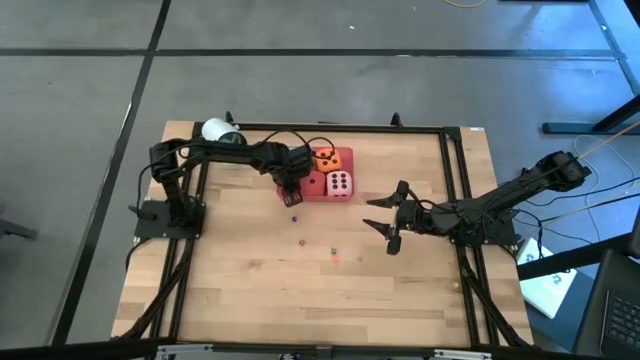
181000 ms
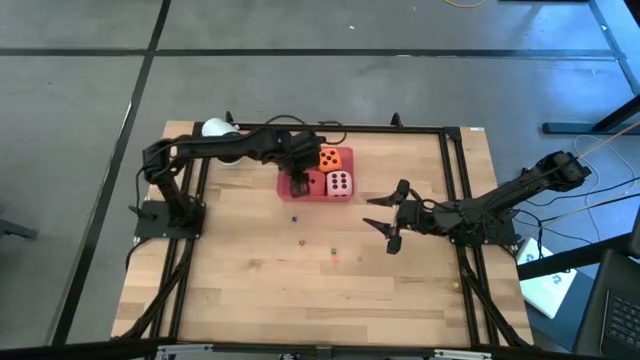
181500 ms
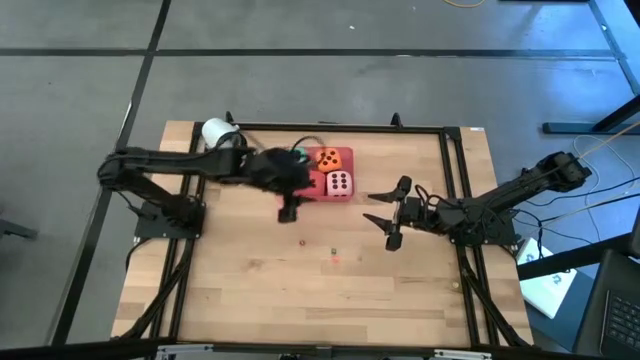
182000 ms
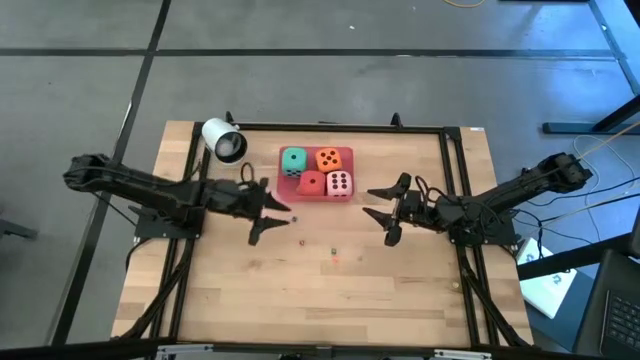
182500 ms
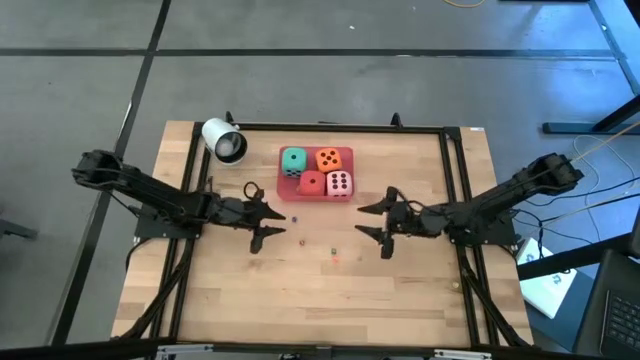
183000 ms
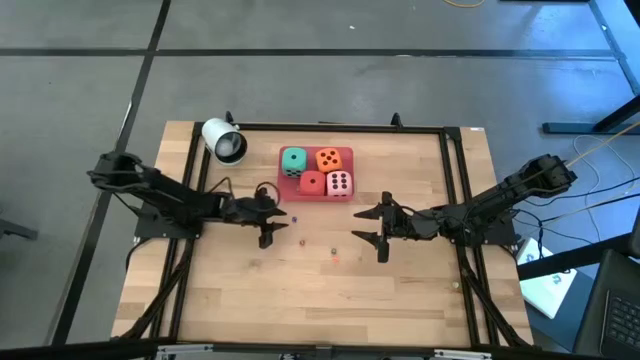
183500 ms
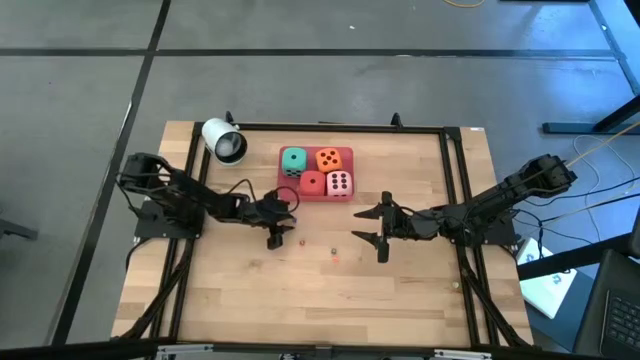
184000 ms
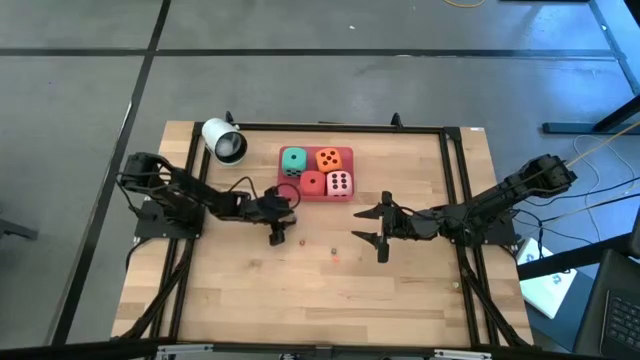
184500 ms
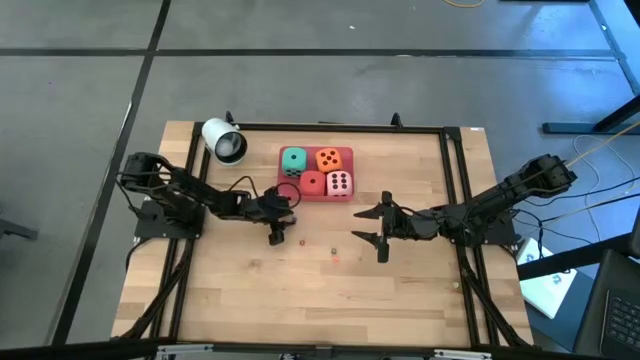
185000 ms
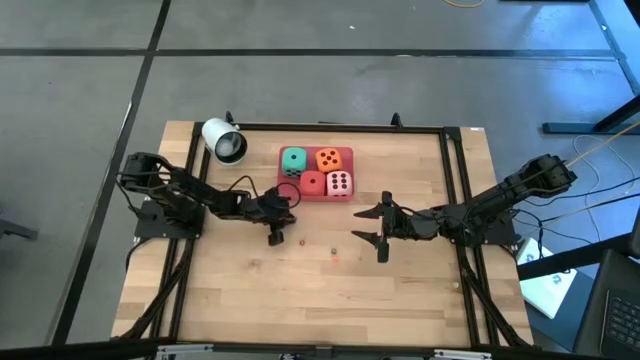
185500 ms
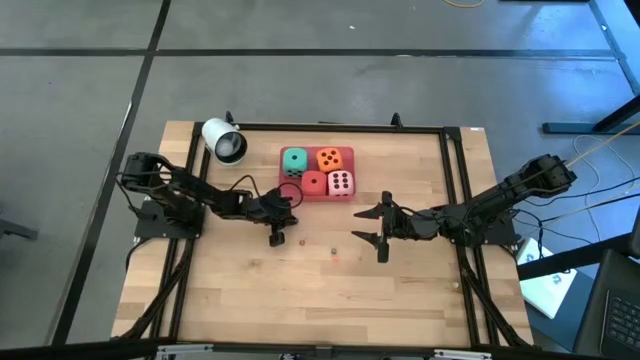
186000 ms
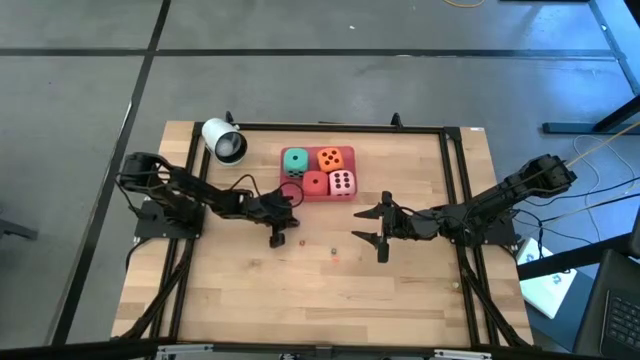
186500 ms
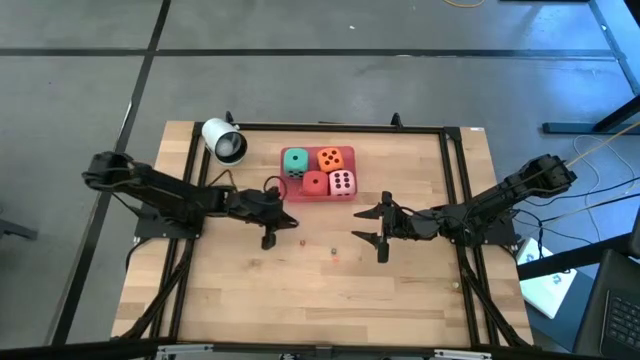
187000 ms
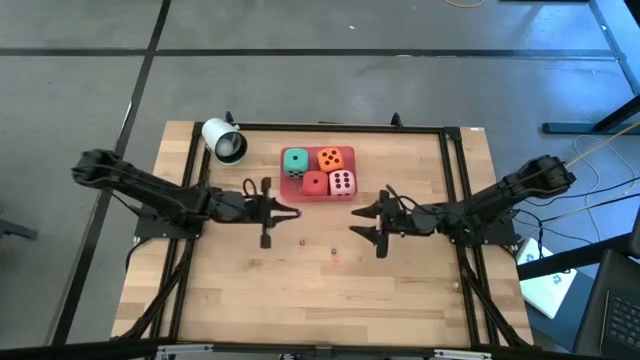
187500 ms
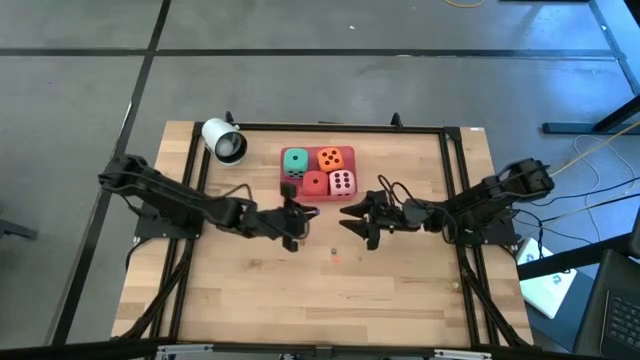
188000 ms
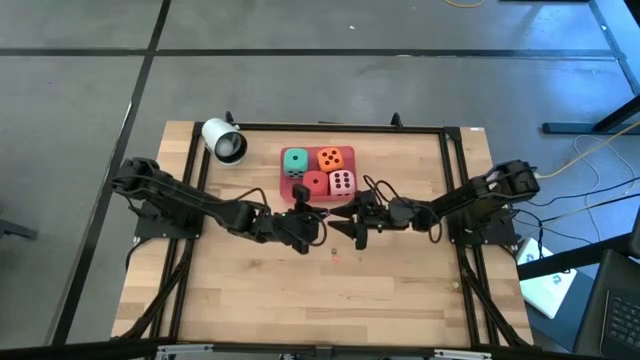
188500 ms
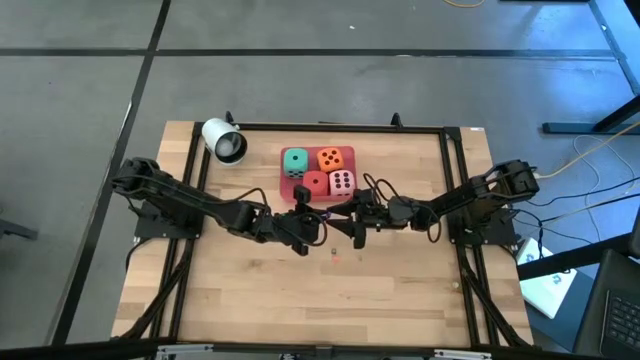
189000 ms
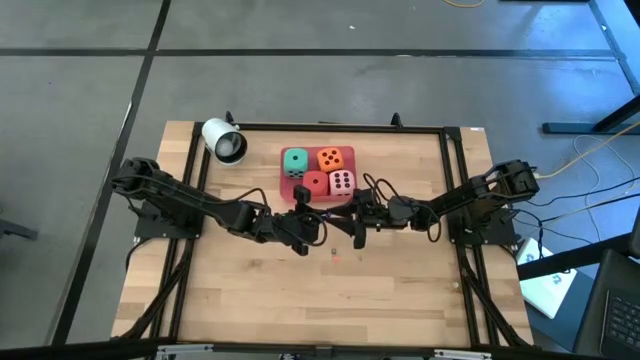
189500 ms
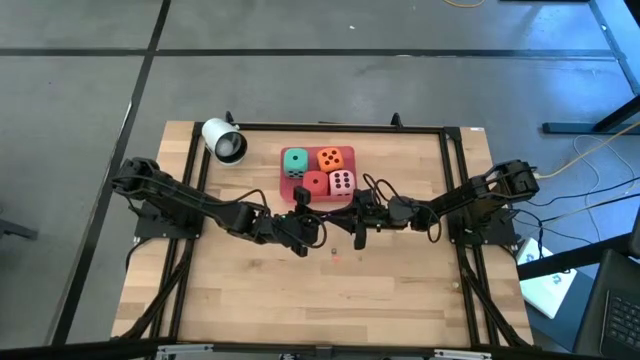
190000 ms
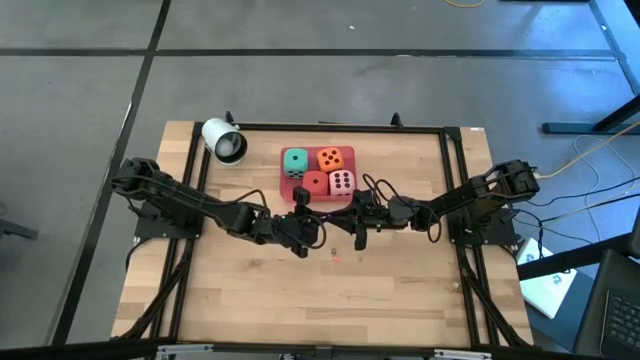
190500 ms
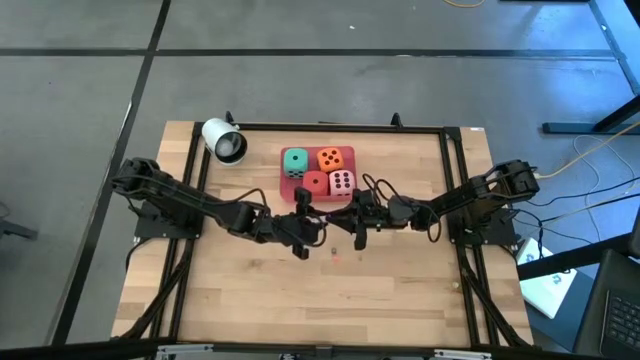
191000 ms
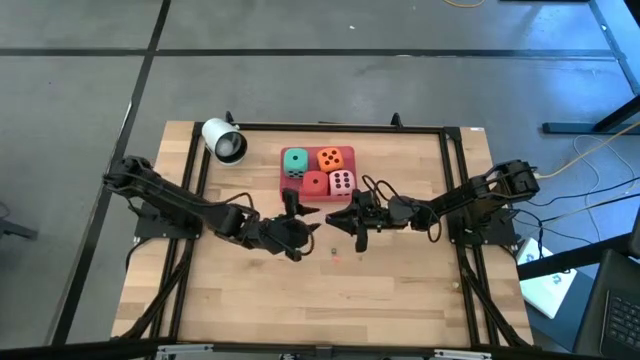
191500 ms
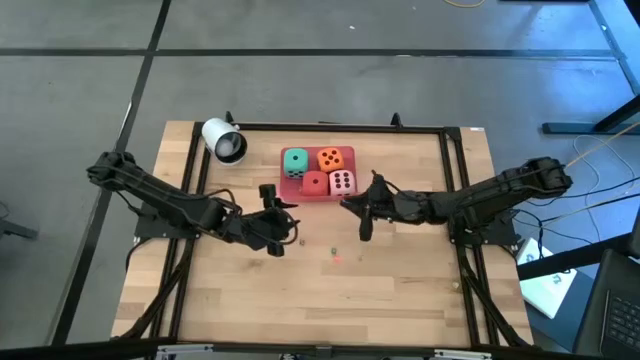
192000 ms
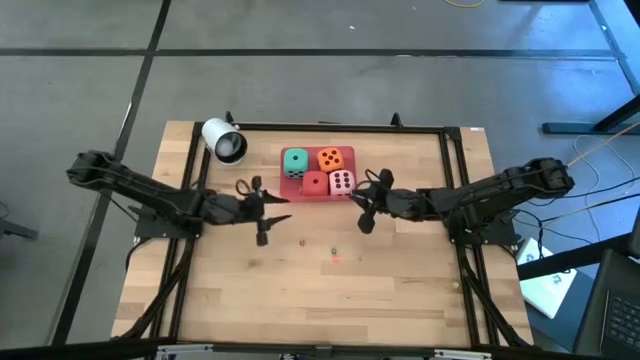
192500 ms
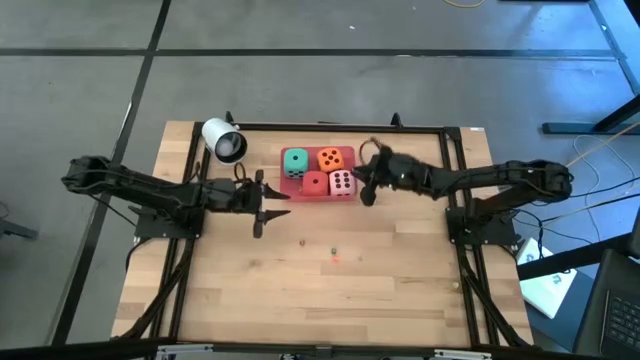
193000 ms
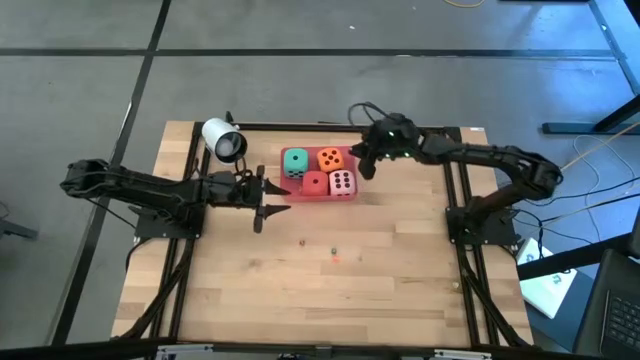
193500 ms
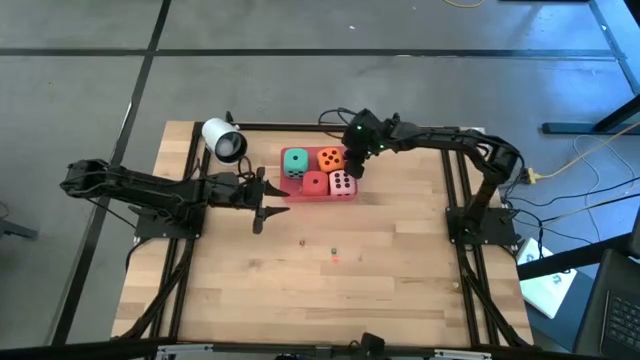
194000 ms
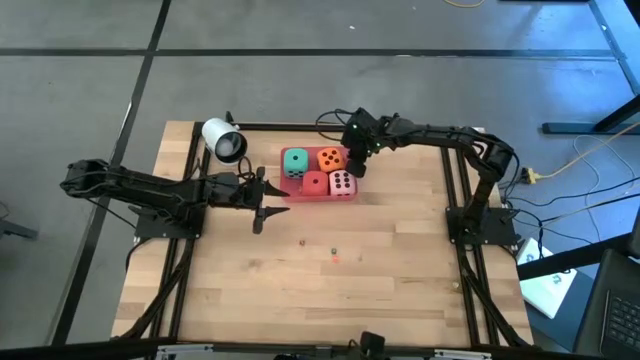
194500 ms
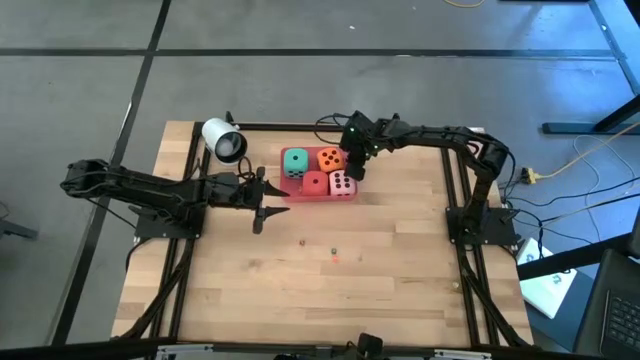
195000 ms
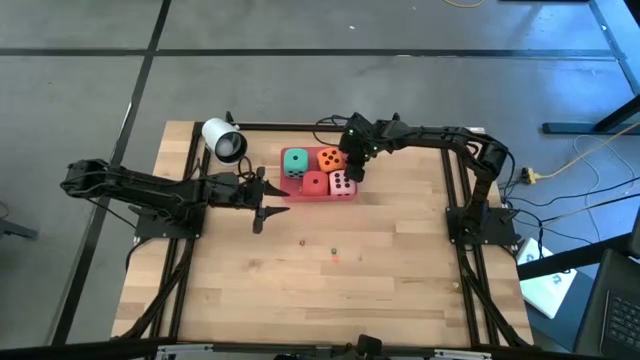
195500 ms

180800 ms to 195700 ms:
Task: Pick & Place Dice
Put the small blue dice into the pink bin

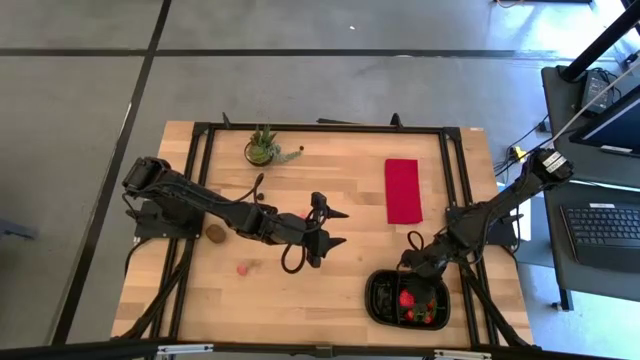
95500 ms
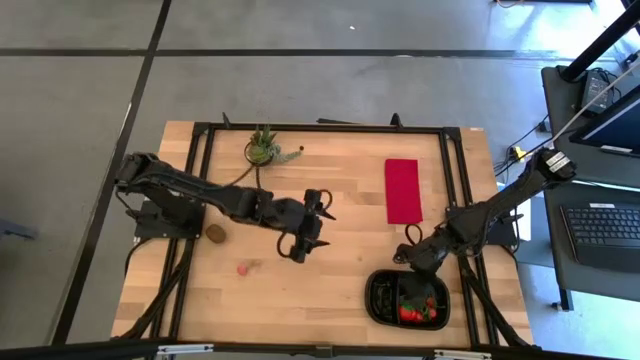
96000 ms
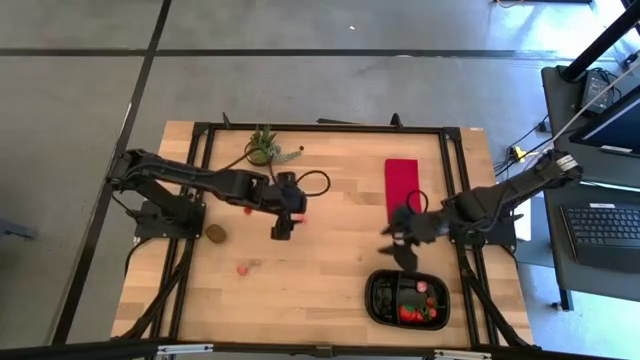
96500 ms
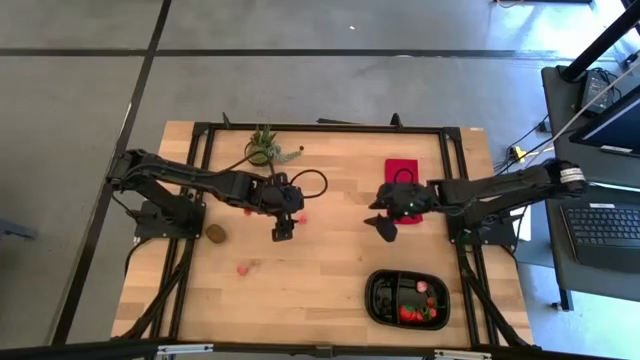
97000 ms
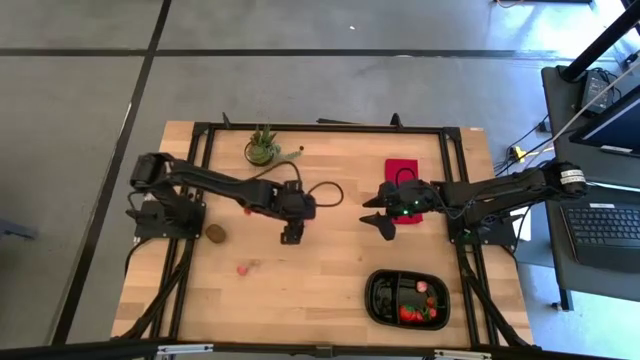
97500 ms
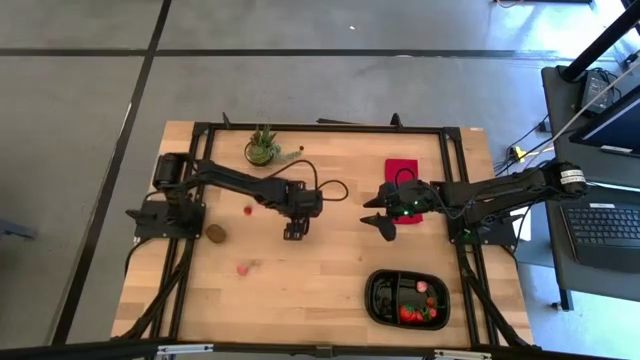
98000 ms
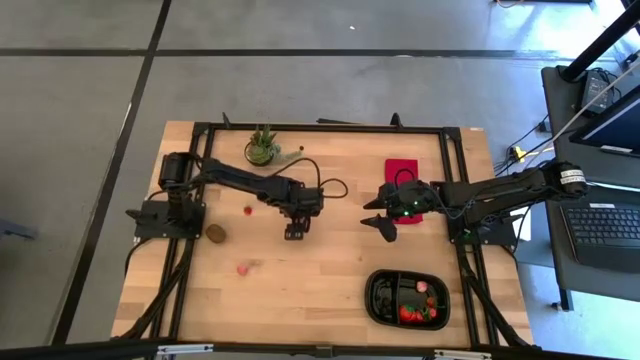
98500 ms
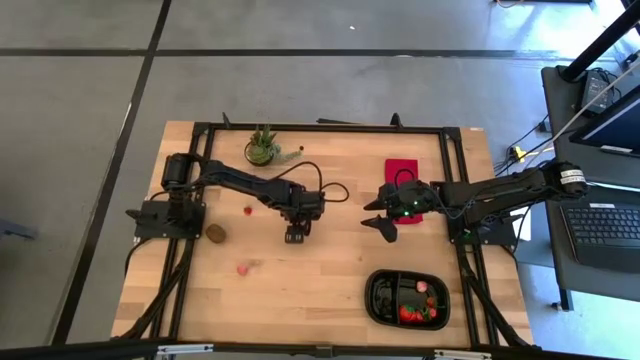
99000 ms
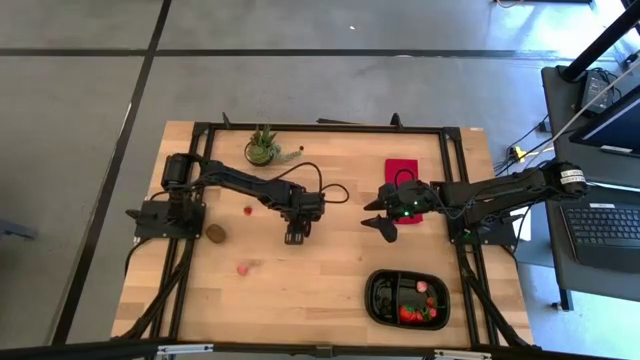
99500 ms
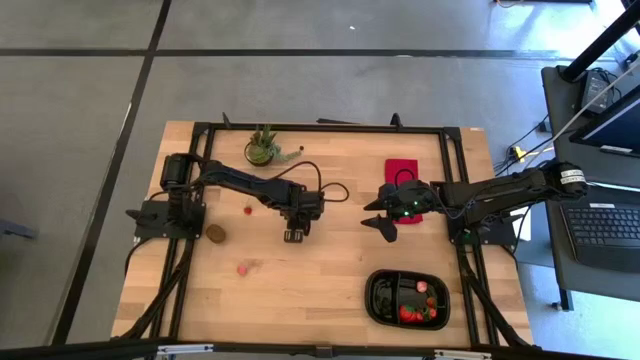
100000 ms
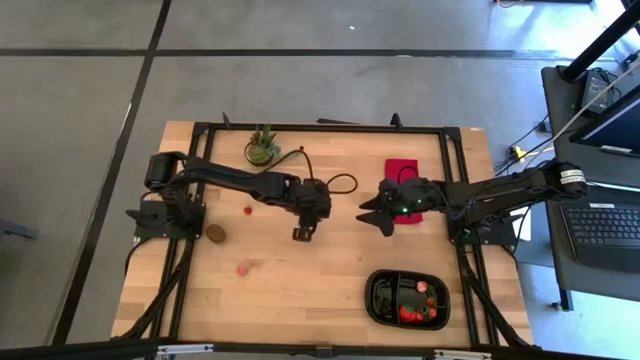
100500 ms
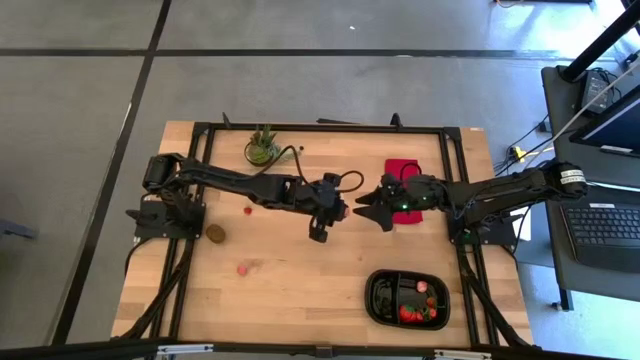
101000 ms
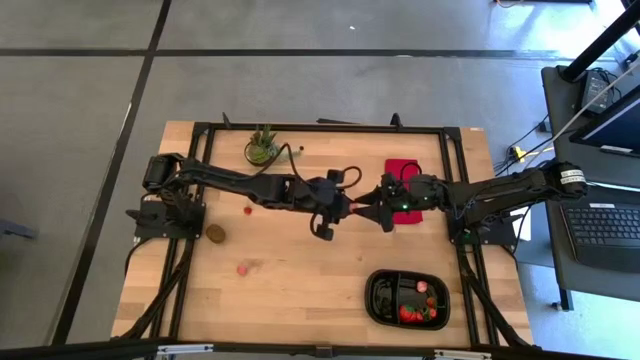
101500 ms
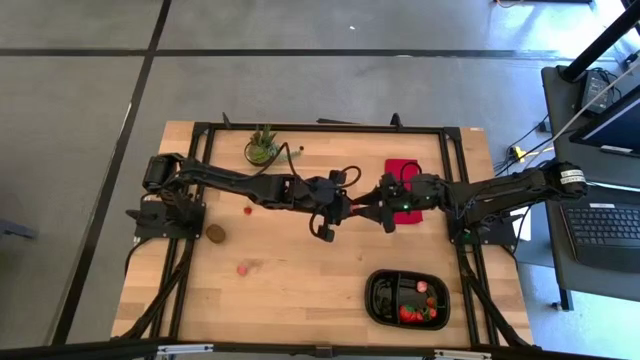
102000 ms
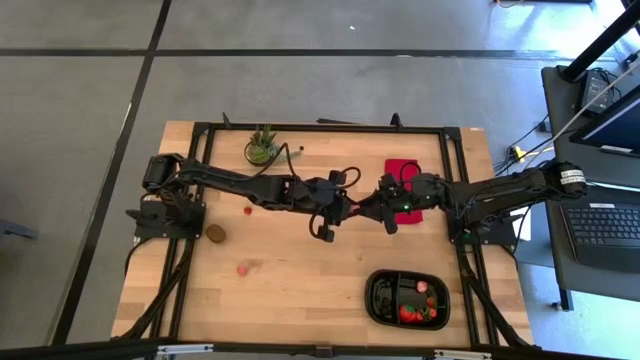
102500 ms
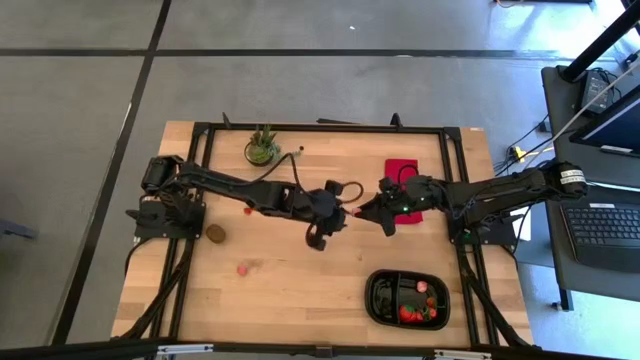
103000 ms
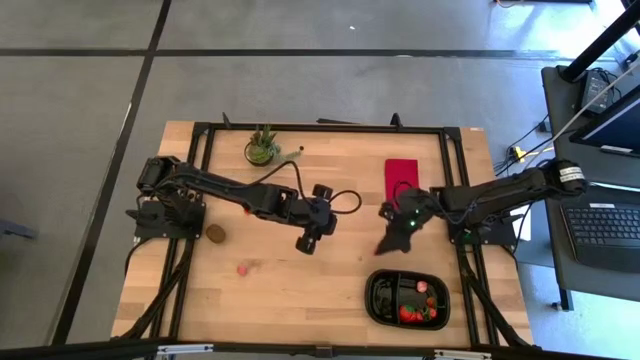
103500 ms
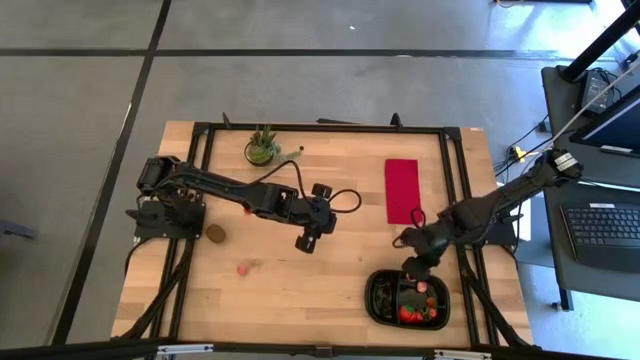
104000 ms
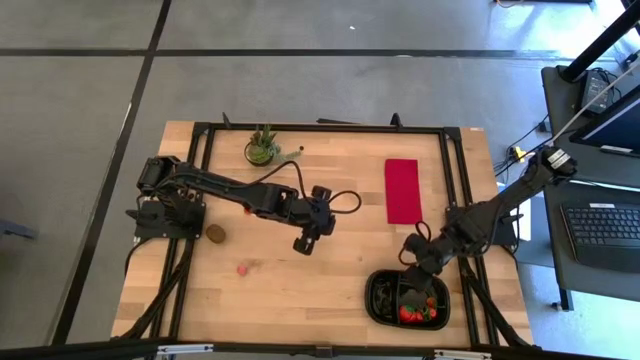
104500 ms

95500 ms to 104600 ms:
Task: Pick and placing Produce into tupperware
Put the peach into the right of the black bin
